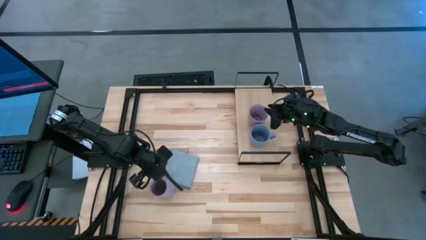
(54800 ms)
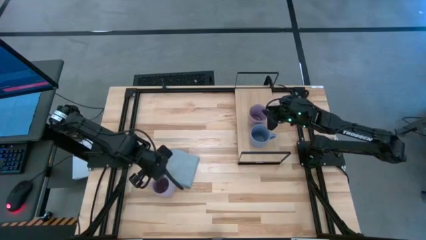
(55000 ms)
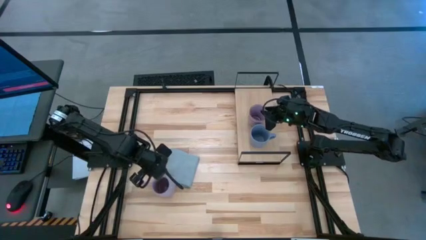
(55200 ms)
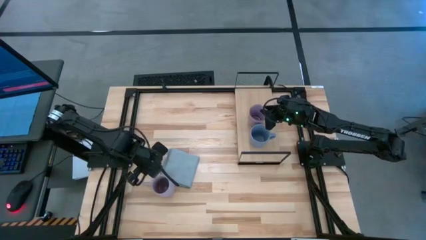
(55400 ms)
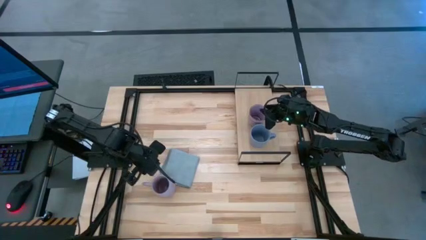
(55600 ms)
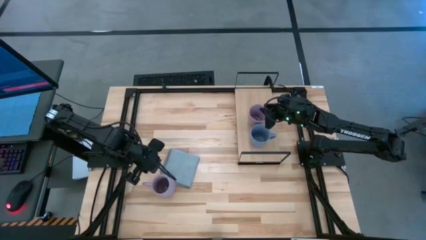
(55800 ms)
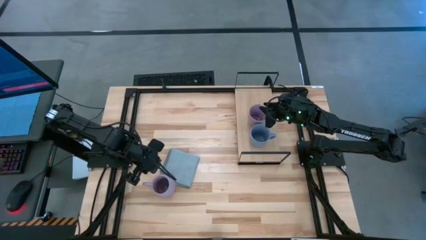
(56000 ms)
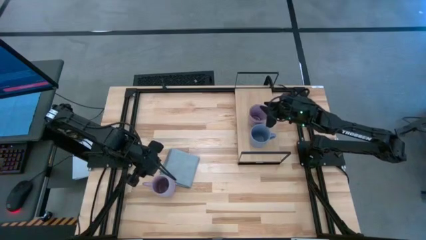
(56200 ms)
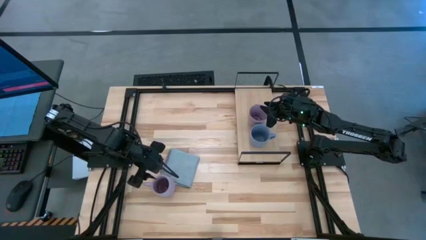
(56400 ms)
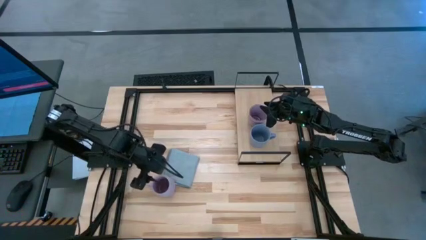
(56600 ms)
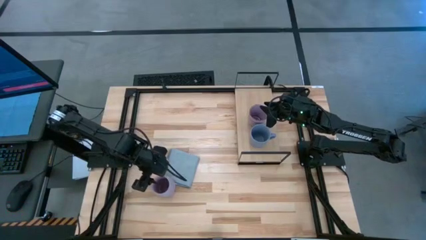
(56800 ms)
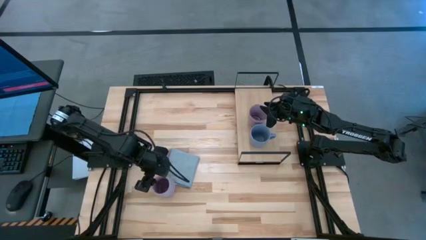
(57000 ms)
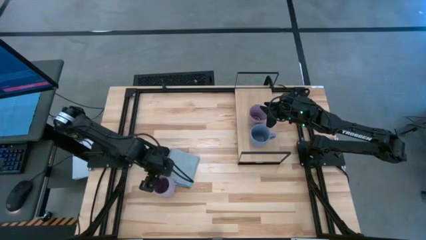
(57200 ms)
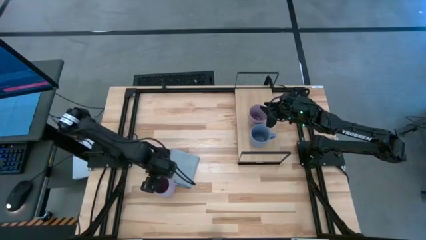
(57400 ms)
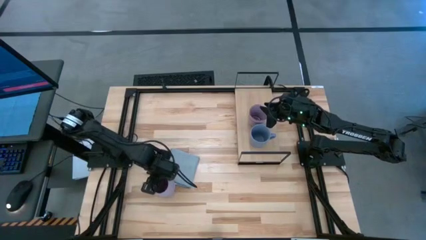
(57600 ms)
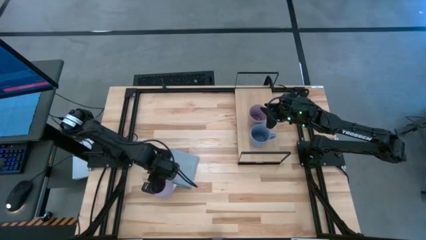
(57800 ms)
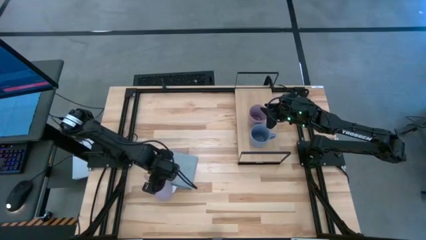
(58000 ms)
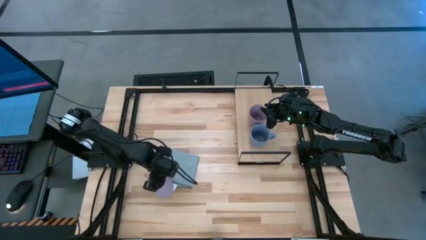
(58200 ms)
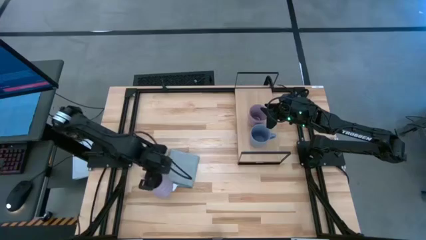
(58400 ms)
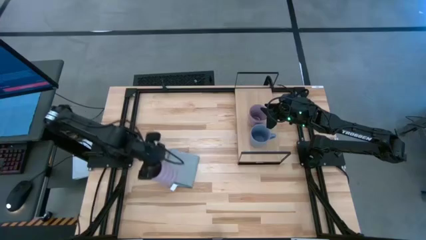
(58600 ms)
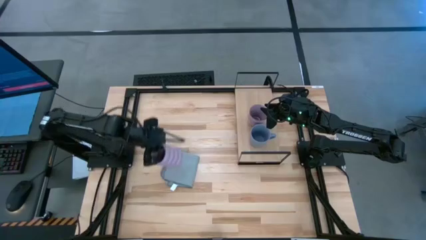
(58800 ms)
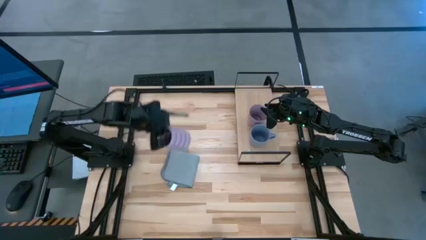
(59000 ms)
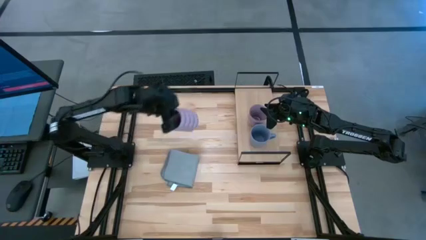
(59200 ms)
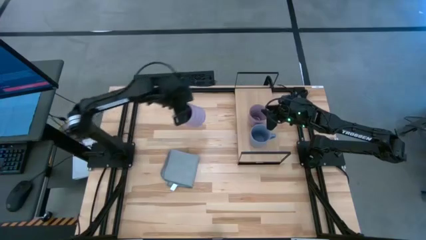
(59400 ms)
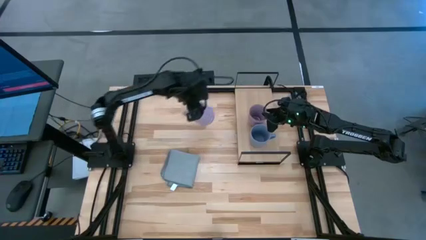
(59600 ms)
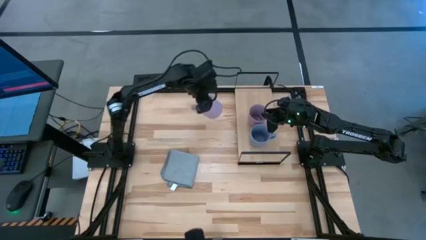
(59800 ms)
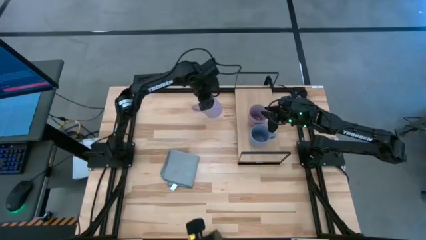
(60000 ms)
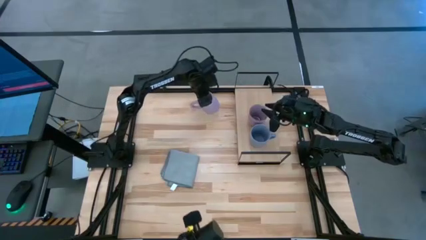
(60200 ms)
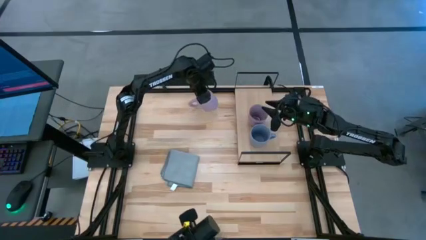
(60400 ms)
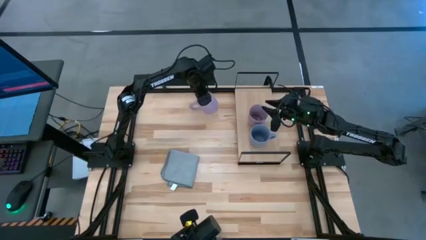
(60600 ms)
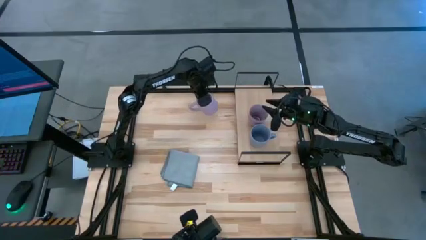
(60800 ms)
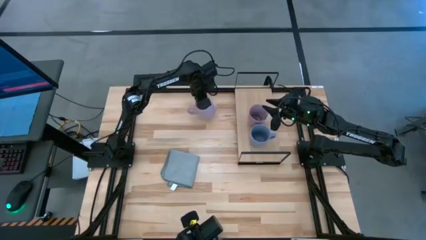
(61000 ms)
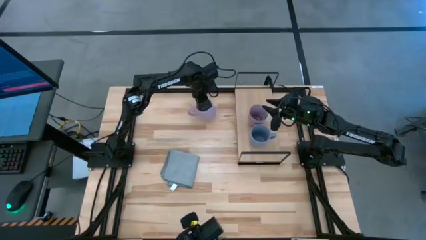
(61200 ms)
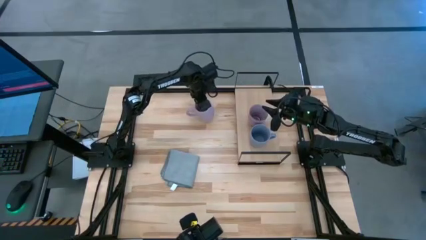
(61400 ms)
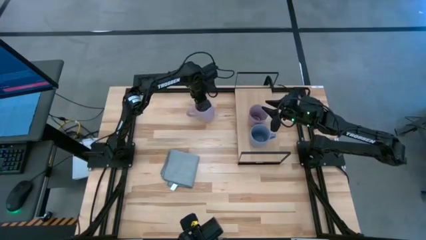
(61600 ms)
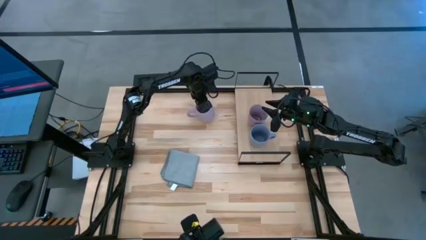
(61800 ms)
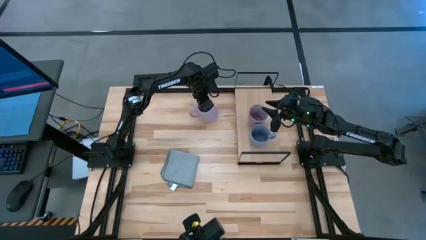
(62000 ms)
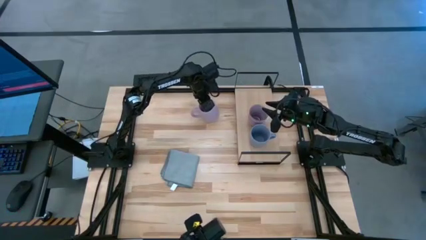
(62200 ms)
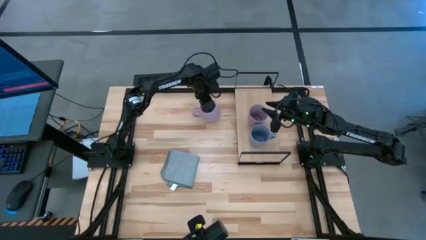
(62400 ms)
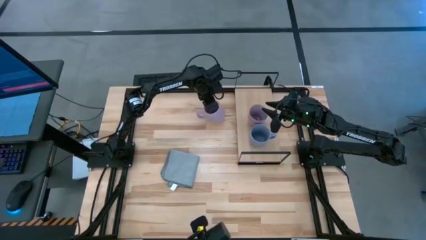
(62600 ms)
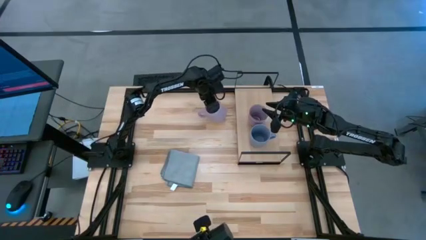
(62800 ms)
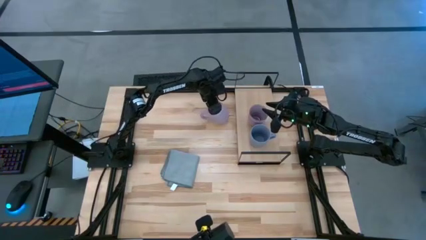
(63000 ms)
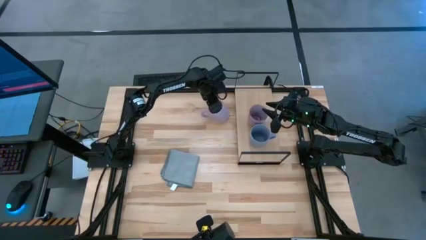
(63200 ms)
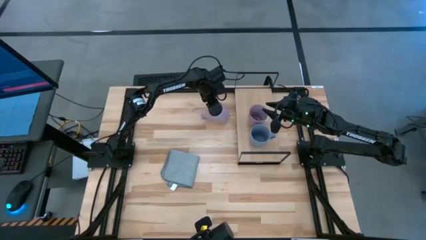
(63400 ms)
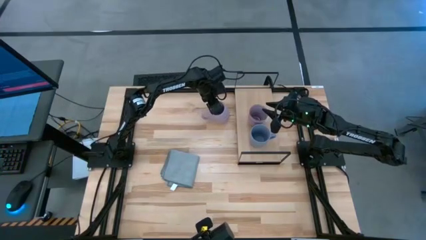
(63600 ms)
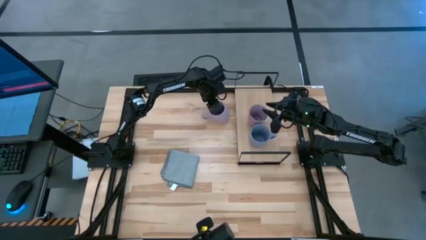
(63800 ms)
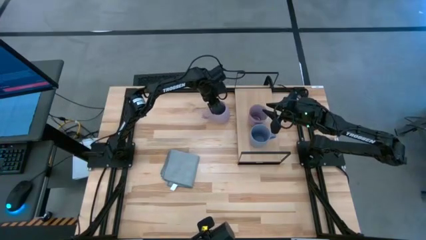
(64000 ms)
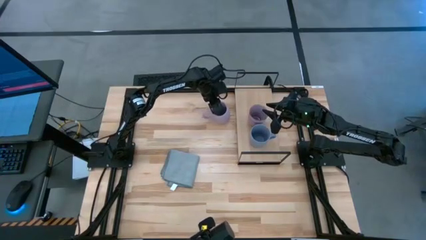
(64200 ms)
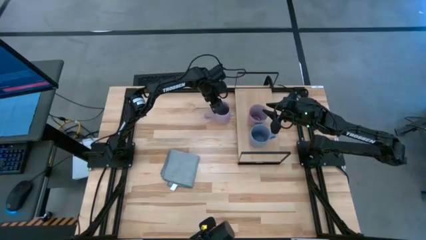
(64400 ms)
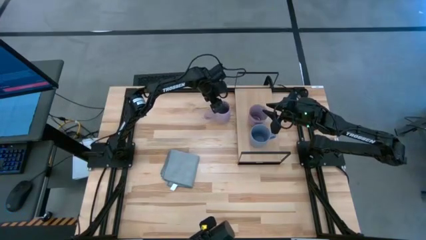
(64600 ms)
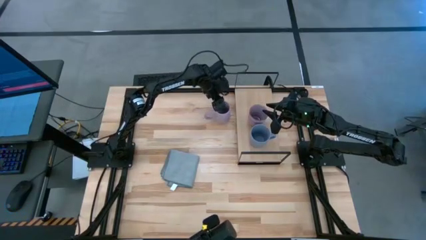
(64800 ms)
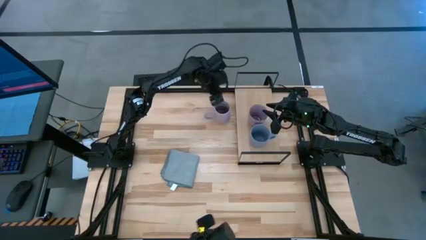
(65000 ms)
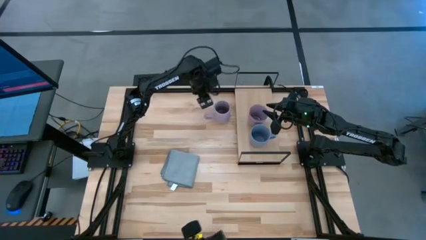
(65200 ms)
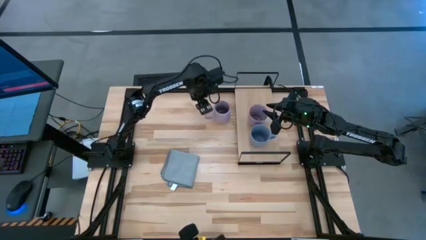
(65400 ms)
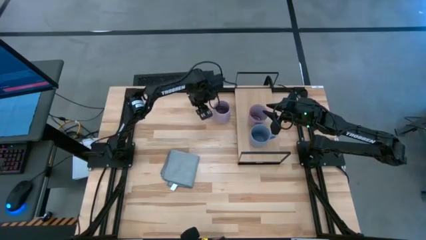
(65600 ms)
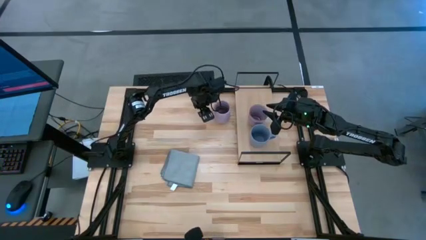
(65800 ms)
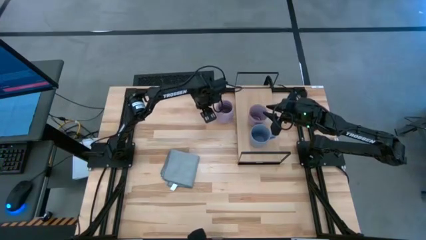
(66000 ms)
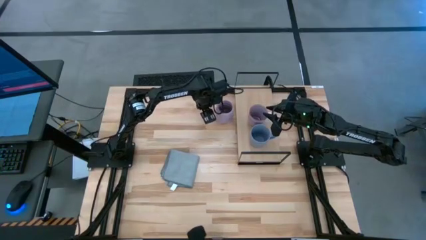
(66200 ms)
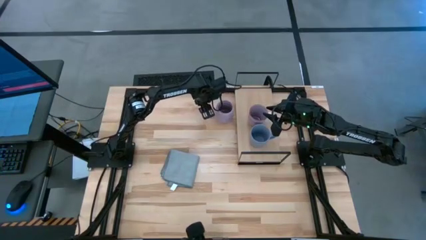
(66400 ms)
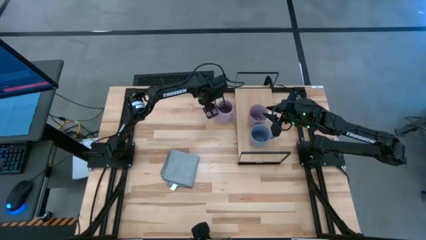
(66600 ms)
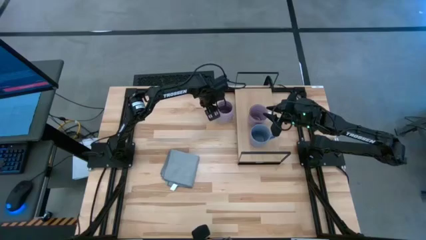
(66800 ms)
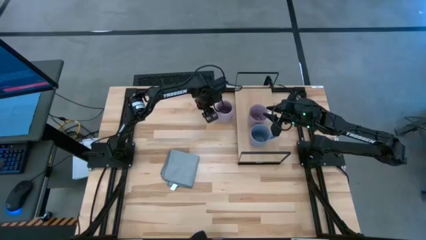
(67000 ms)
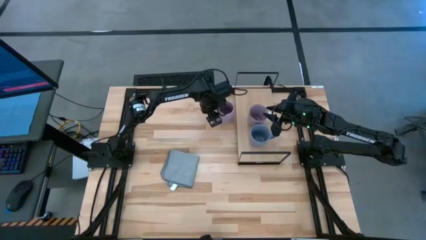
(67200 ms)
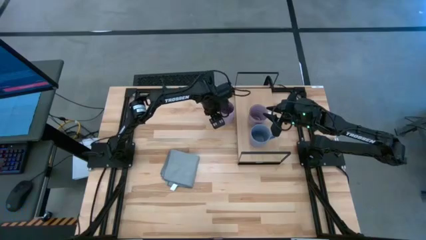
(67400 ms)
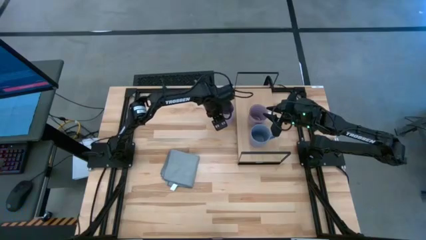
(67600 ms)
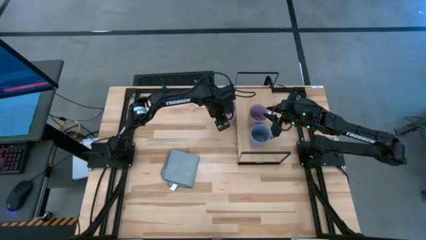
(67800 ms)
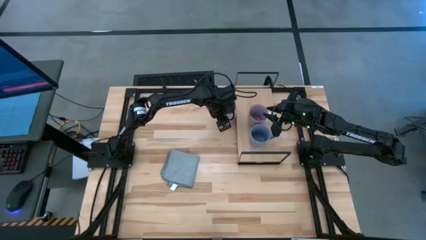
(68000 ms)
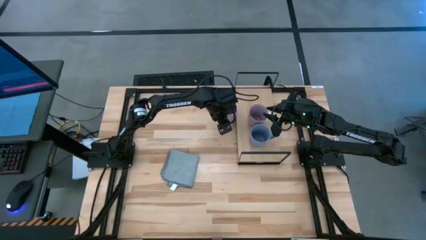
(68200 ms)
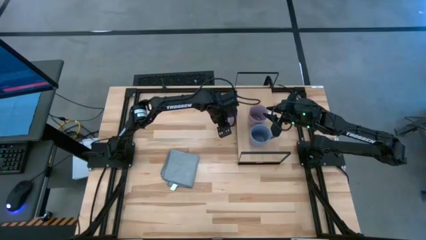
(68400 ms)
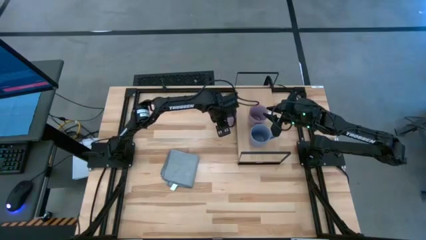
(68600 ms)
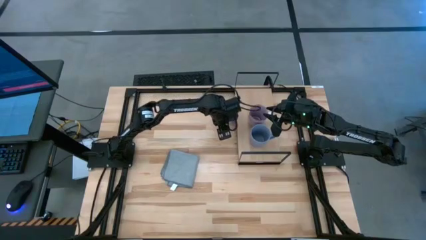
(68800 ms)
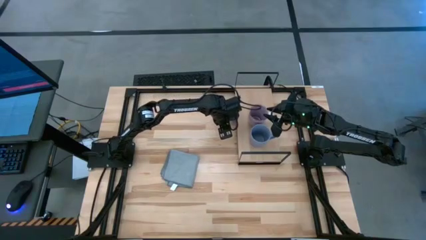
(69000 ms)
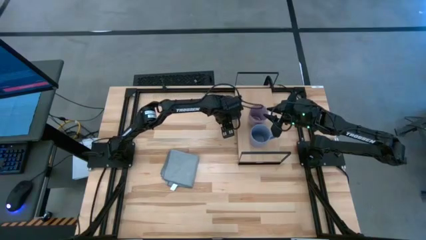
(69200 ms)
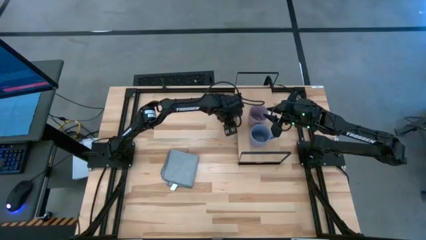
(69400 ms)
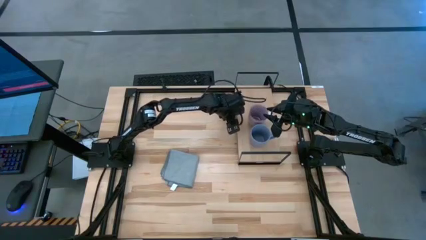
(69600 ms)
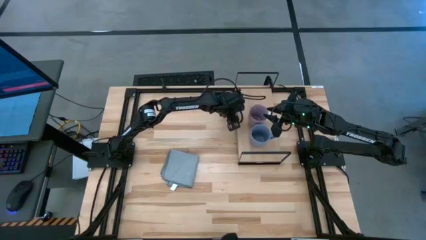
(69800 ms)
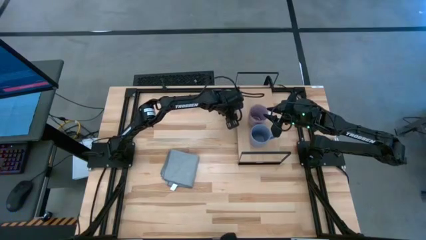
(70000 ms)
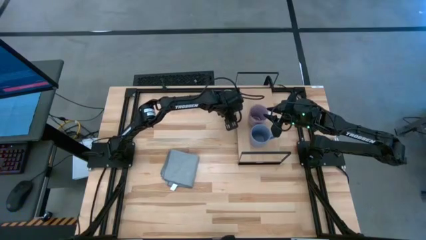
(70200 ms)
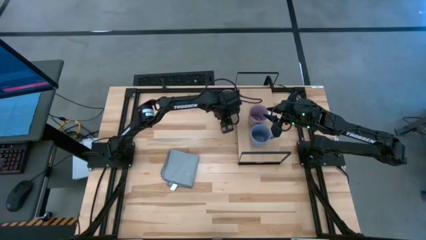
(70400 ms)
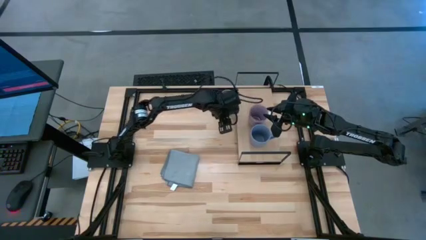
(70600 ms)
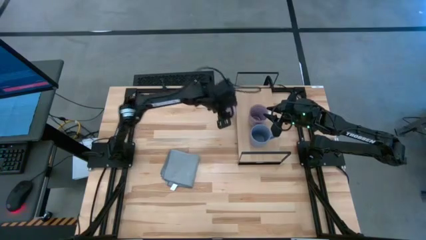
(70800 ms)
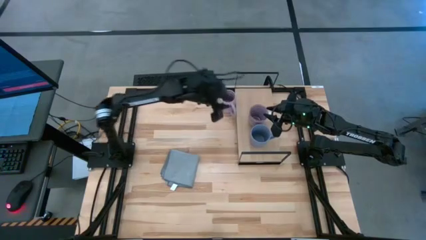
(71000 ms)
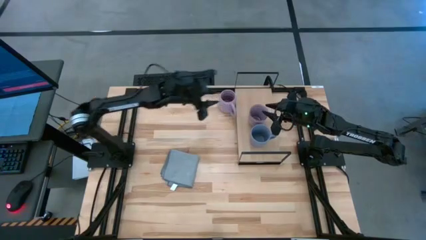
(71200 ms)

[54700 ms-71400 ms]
Task: Stack small to large cups/mugs on shelf
Put the purple mug on the shelf
